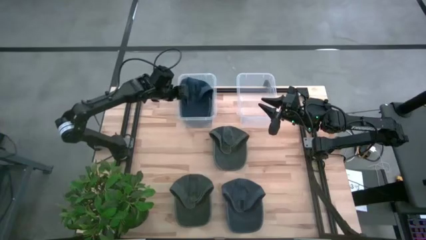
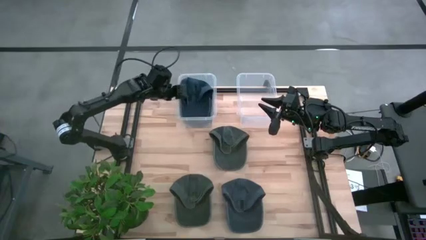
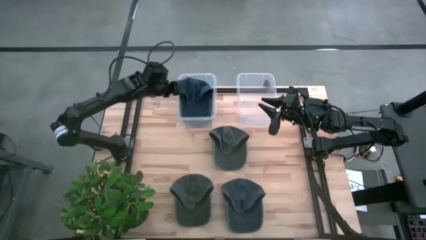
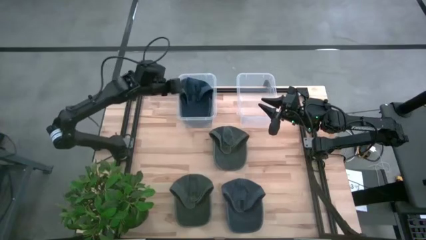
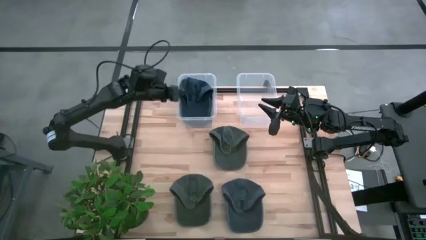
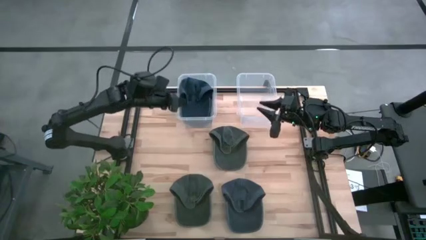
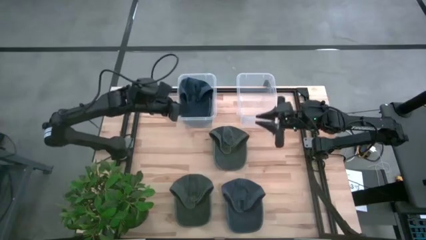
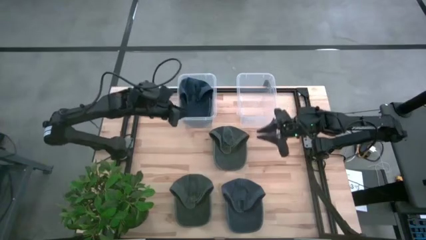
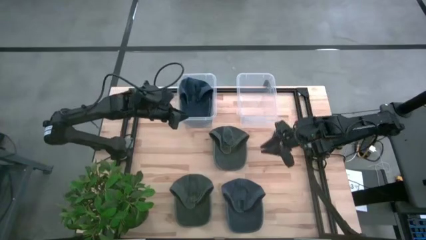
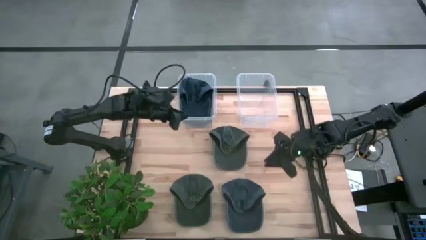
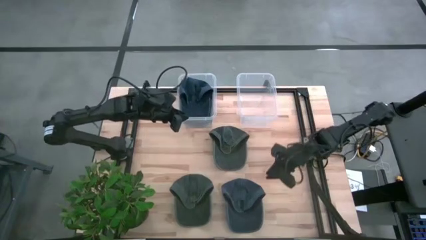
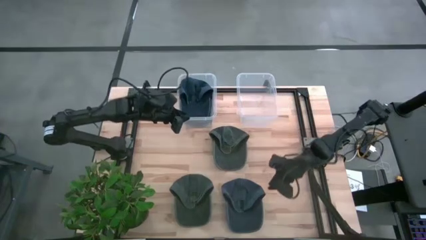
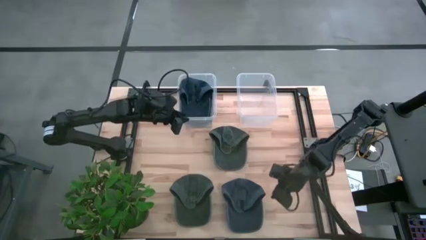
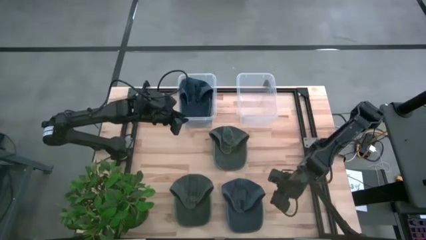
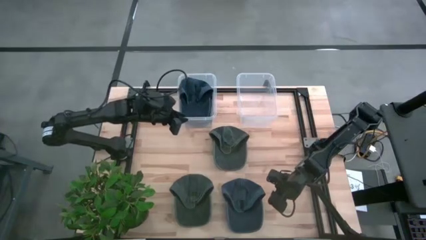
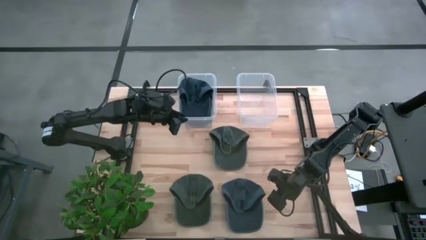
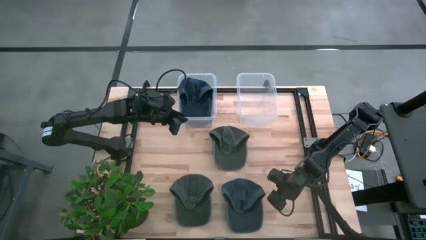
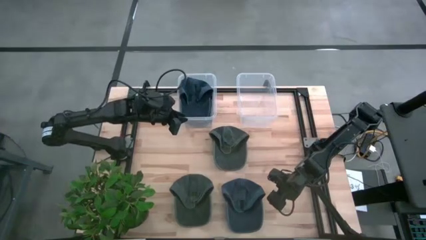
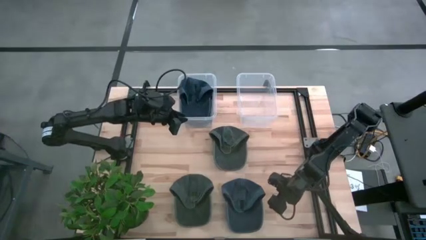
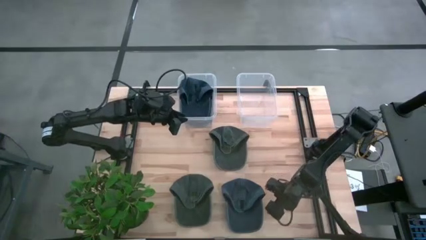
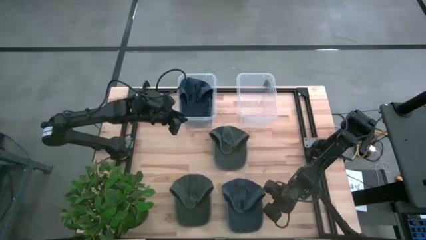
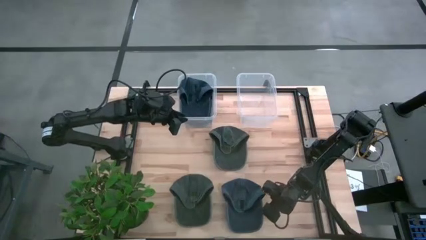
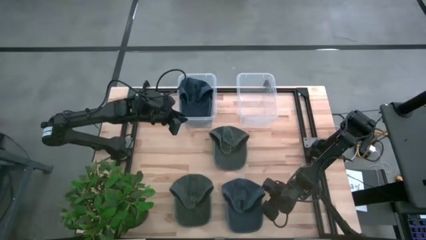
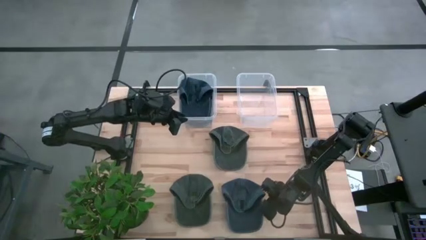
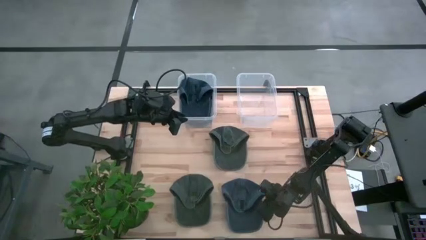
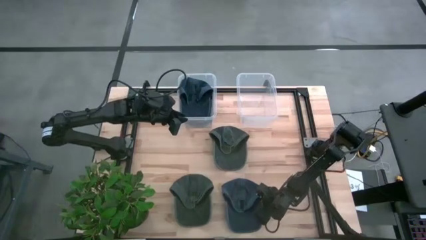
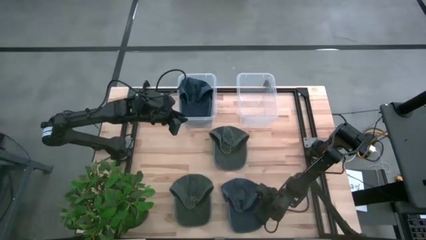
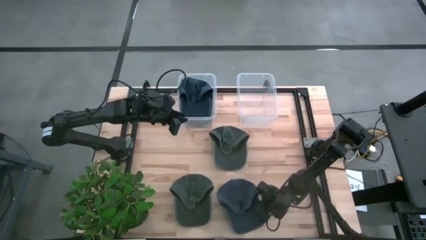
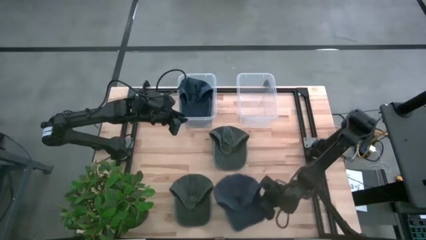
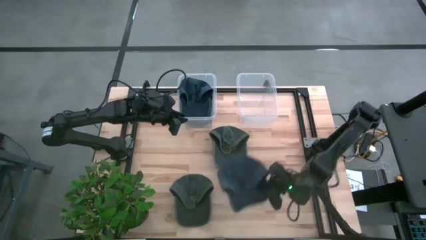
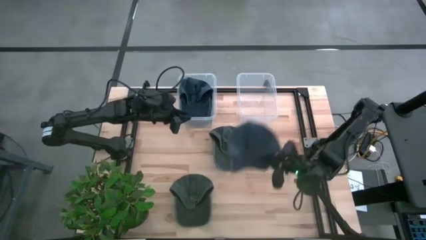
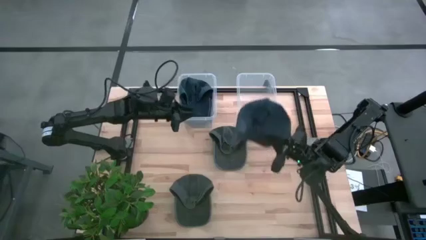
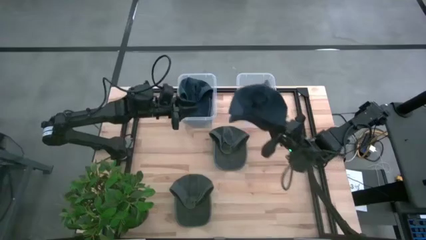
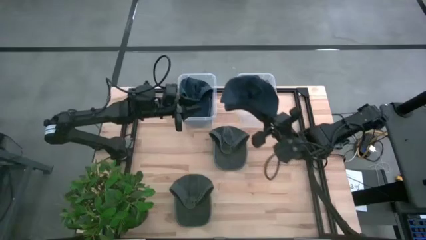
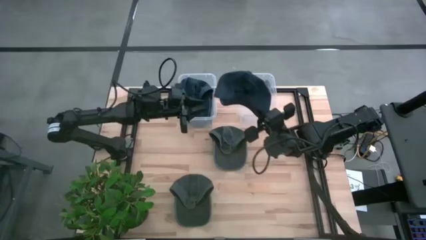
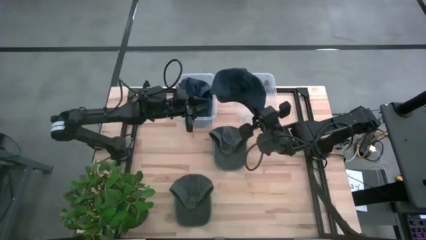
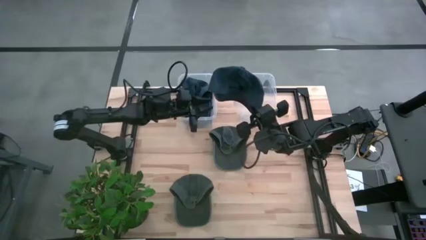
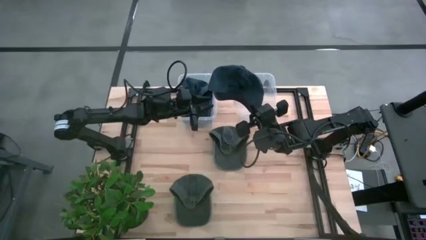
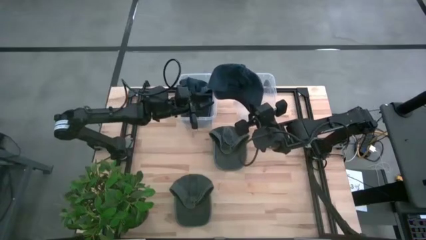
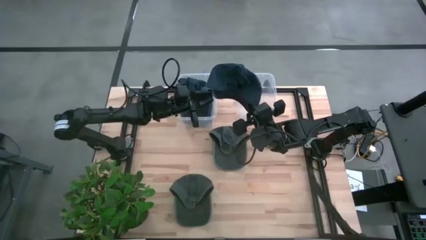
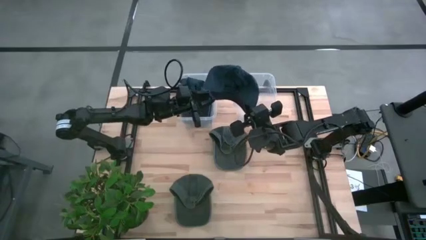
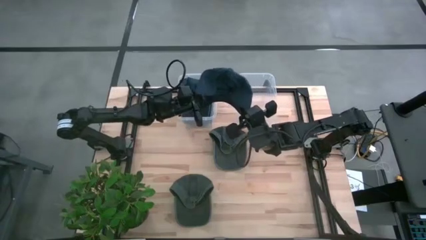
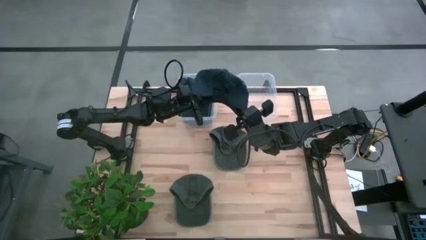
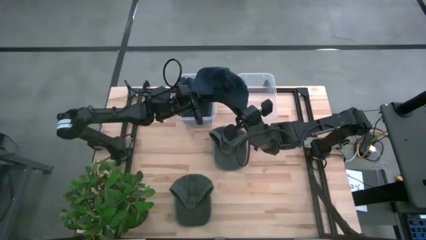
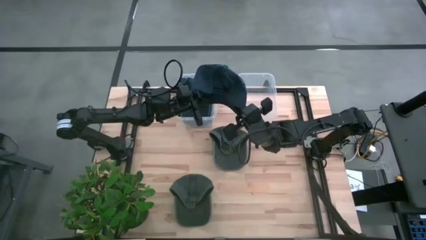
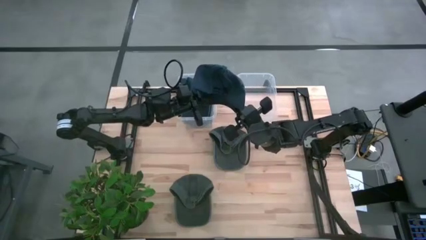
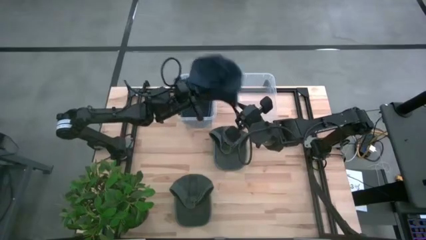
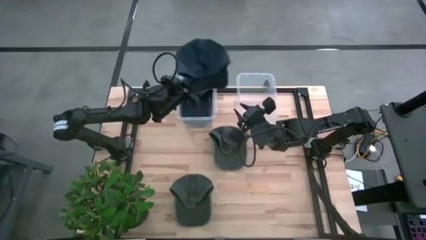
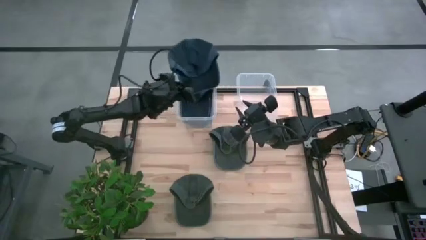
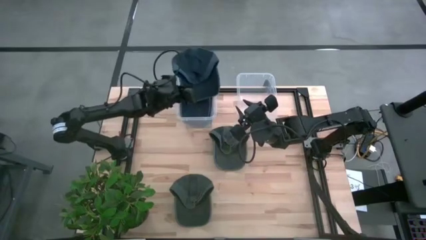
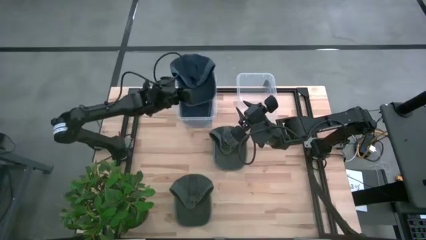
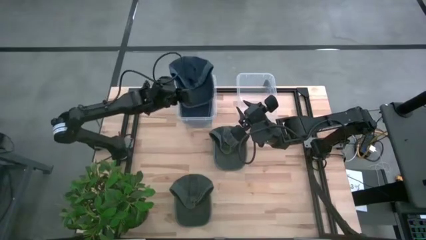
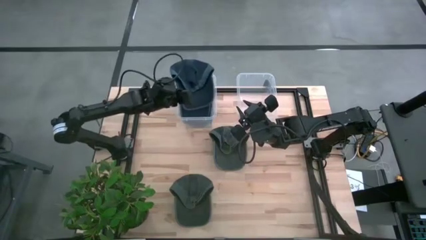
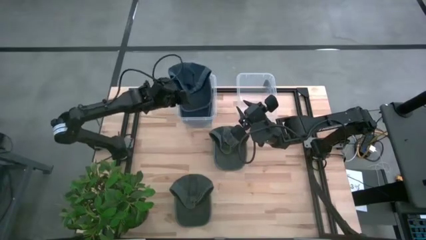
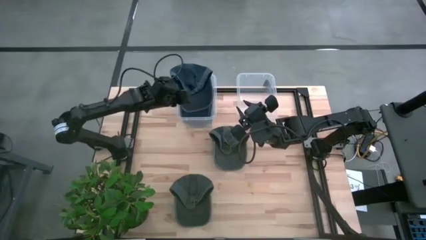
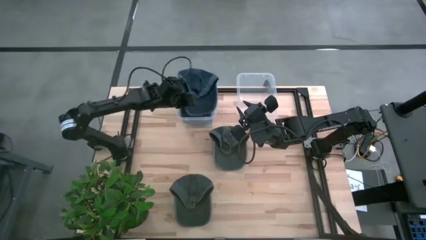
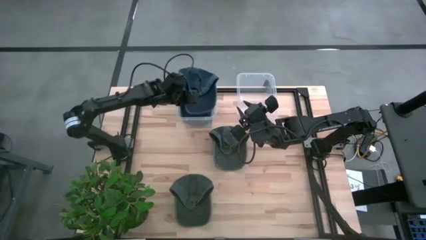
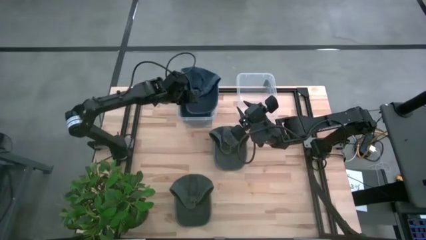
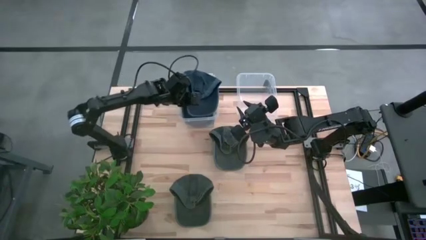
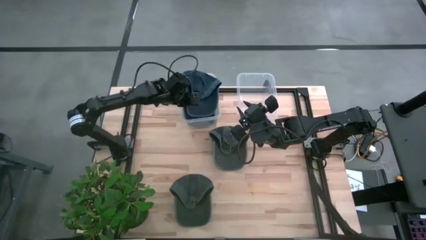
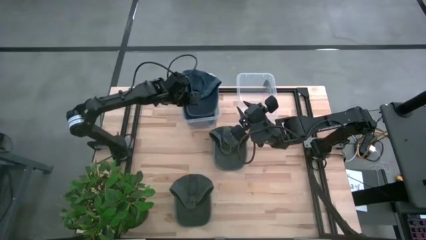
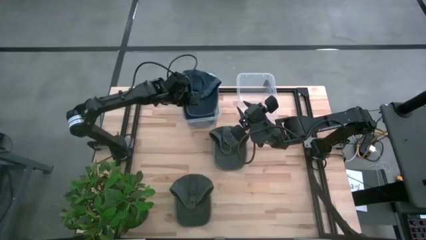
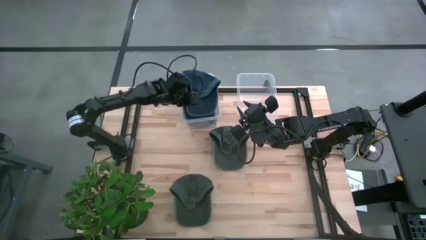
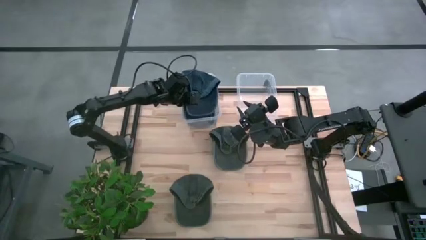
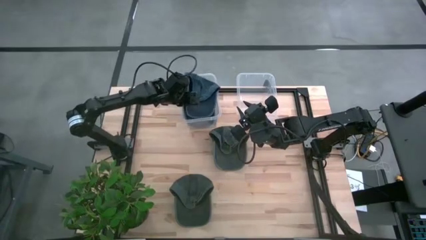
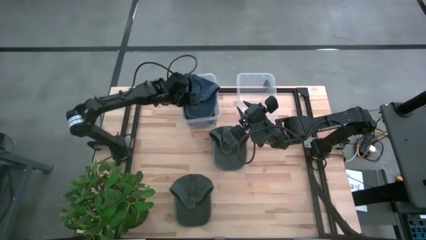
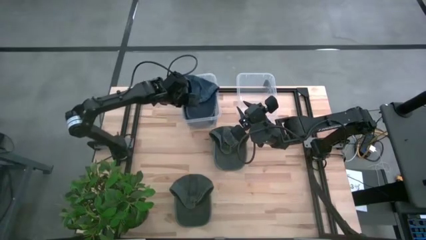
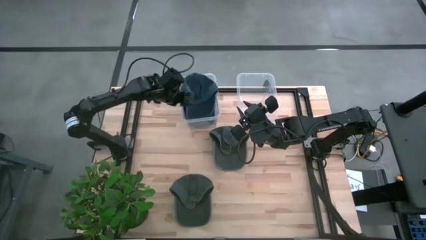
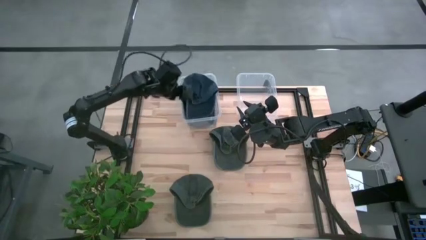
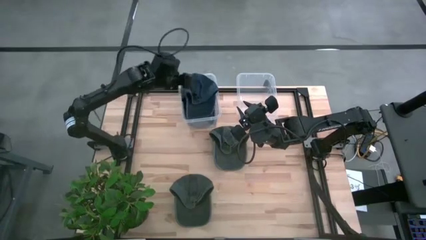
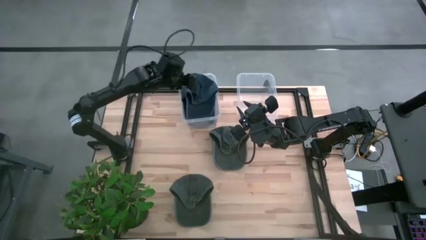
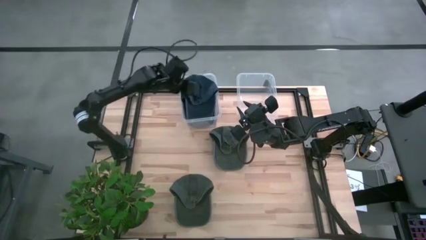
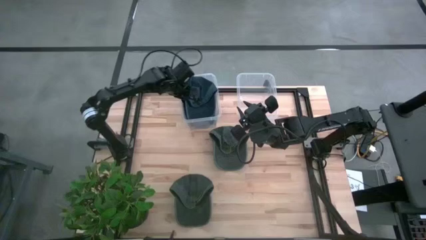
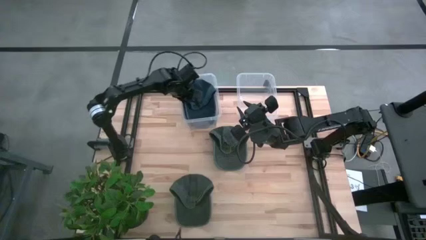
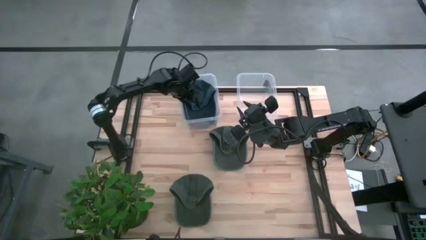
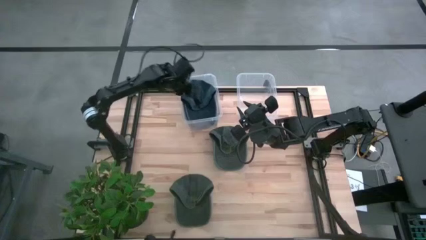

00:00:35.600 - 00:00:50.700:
Task: Pick & Place hat
Put the blue cap into the left transparent bin
